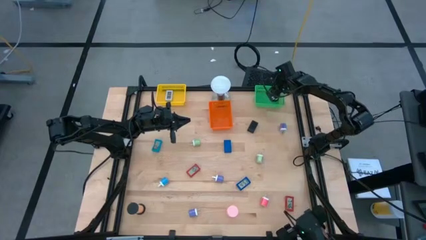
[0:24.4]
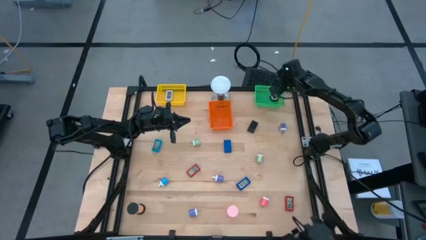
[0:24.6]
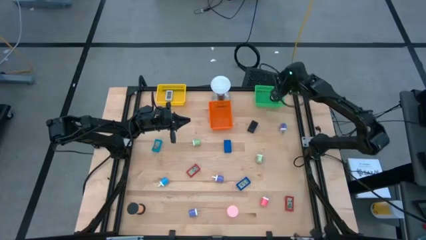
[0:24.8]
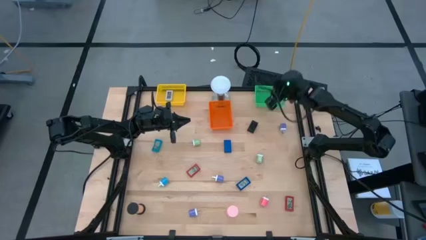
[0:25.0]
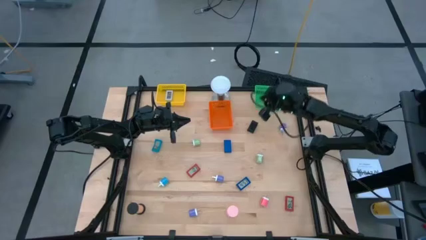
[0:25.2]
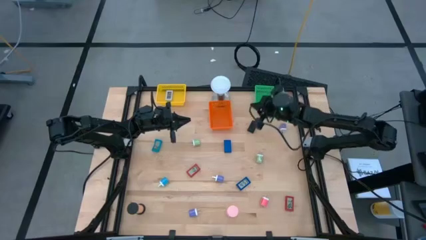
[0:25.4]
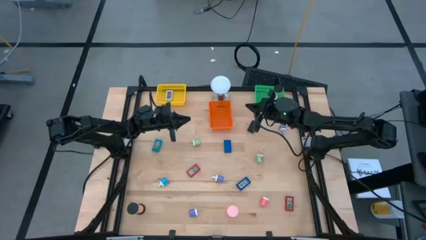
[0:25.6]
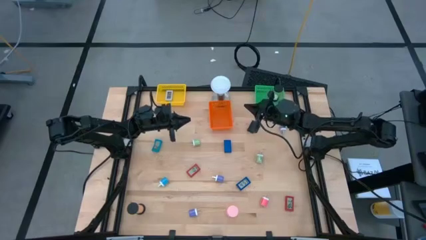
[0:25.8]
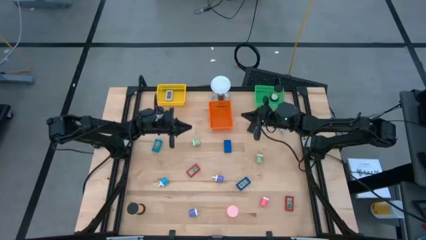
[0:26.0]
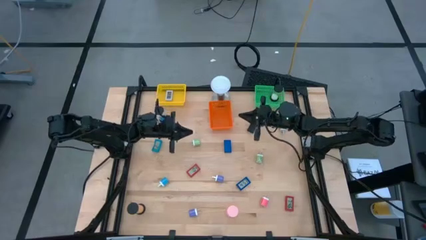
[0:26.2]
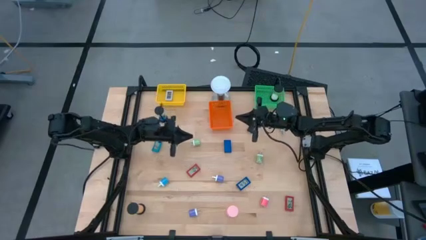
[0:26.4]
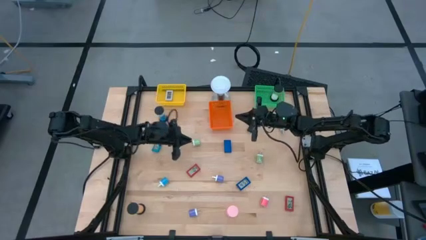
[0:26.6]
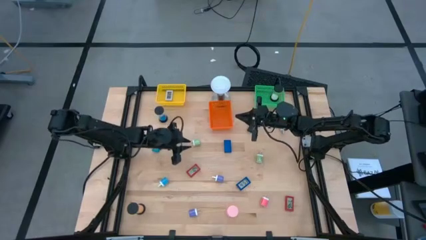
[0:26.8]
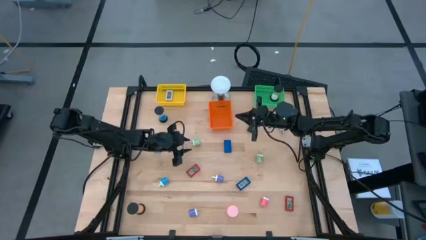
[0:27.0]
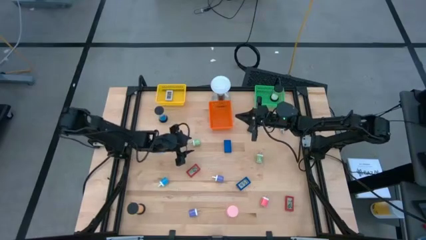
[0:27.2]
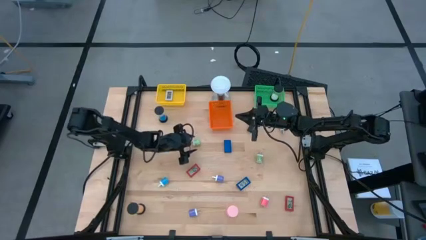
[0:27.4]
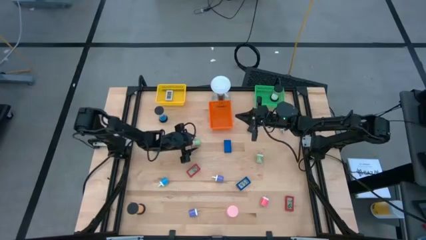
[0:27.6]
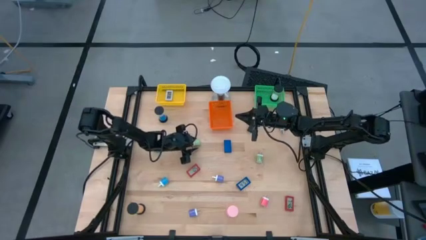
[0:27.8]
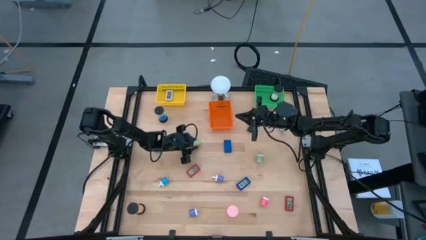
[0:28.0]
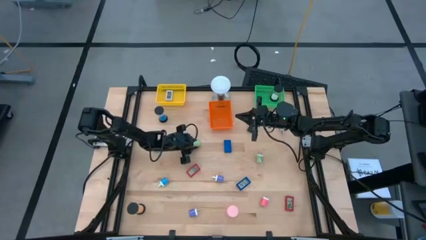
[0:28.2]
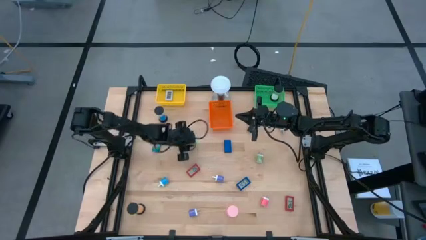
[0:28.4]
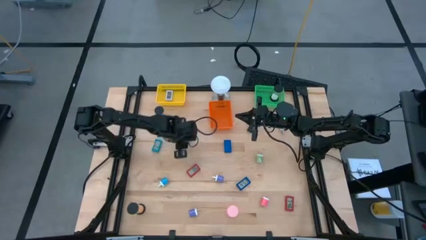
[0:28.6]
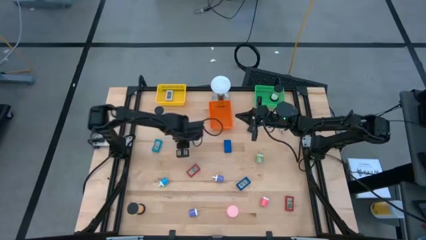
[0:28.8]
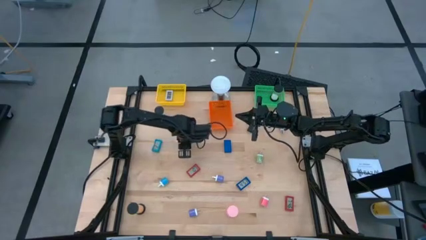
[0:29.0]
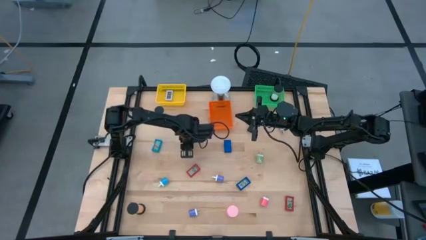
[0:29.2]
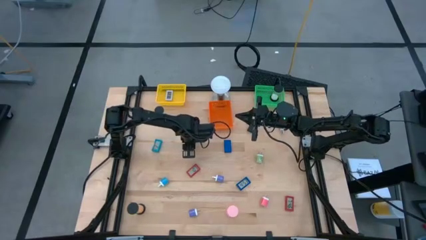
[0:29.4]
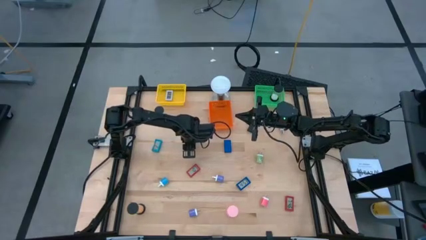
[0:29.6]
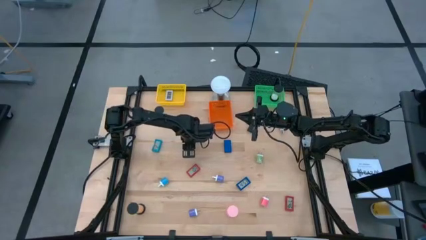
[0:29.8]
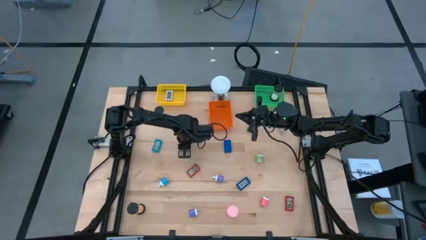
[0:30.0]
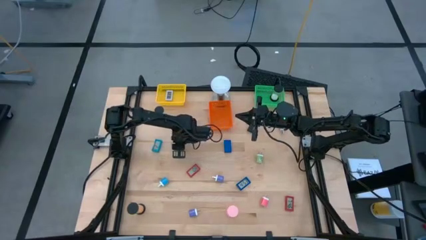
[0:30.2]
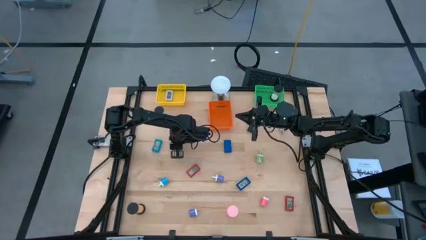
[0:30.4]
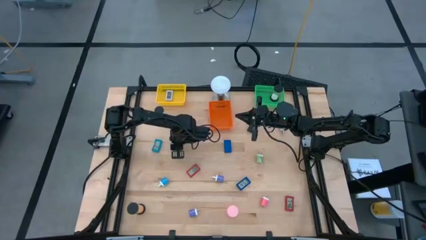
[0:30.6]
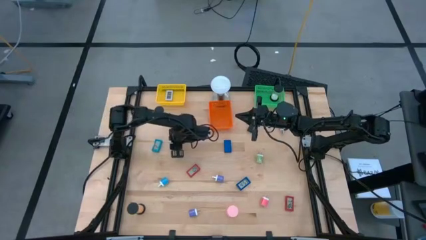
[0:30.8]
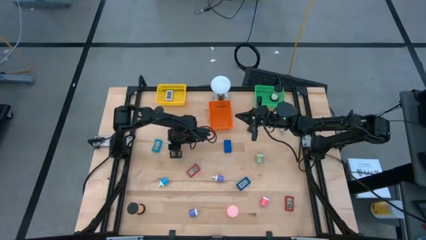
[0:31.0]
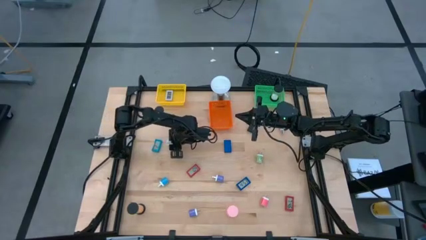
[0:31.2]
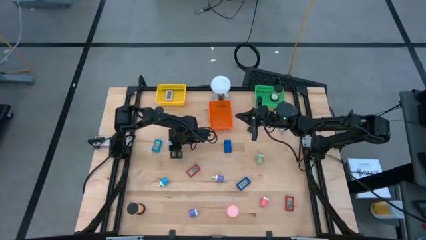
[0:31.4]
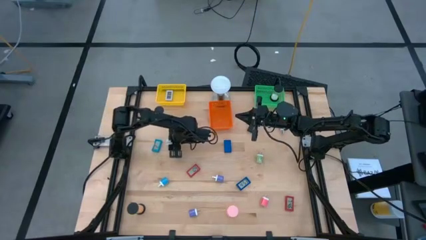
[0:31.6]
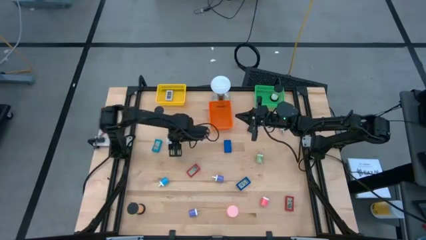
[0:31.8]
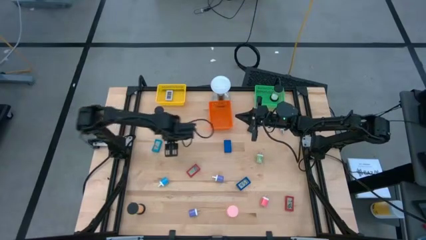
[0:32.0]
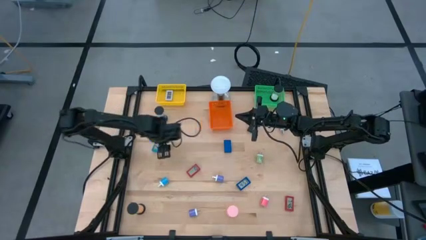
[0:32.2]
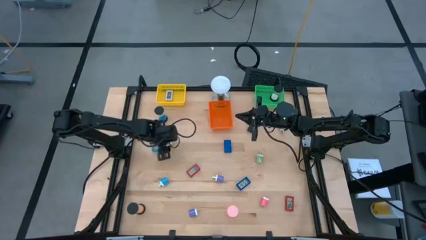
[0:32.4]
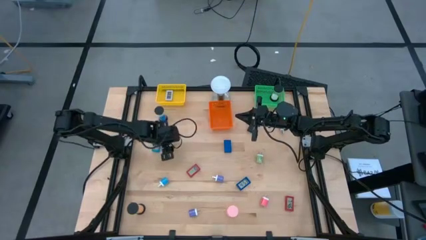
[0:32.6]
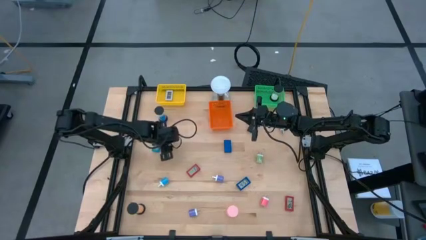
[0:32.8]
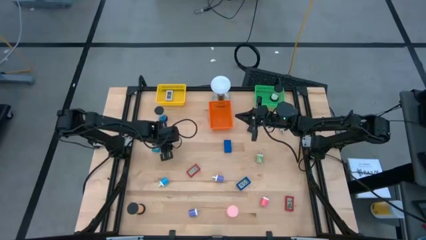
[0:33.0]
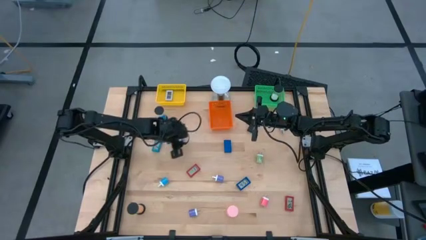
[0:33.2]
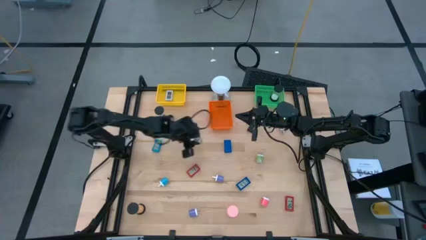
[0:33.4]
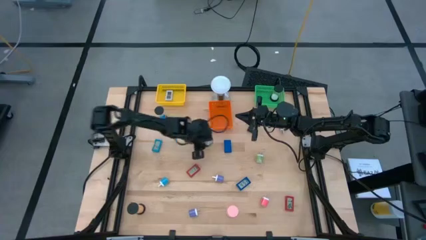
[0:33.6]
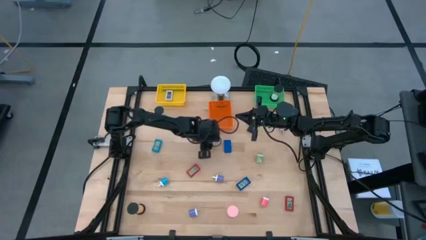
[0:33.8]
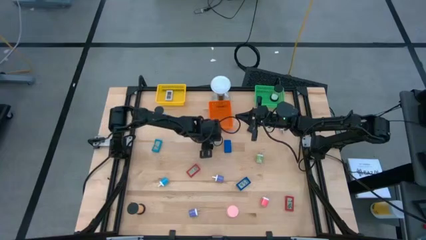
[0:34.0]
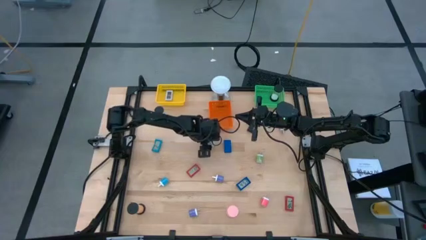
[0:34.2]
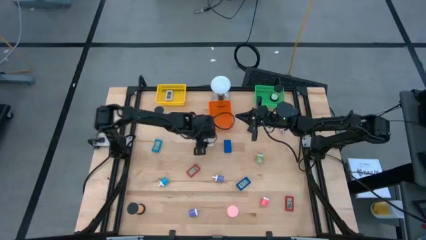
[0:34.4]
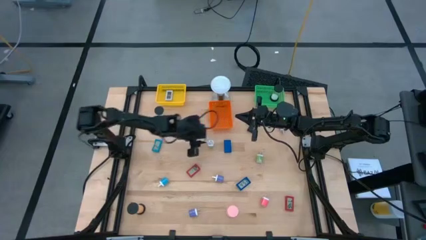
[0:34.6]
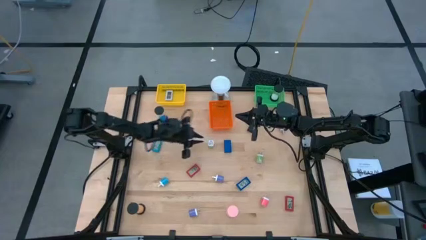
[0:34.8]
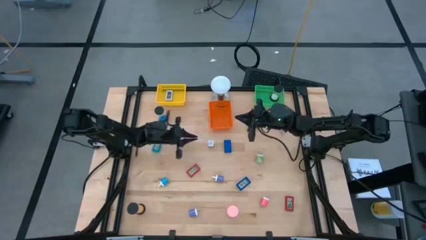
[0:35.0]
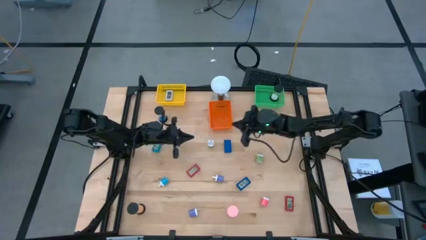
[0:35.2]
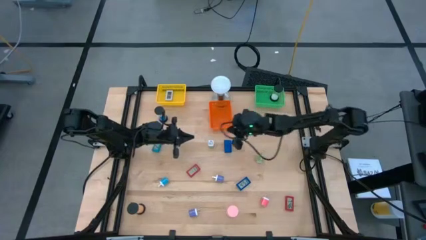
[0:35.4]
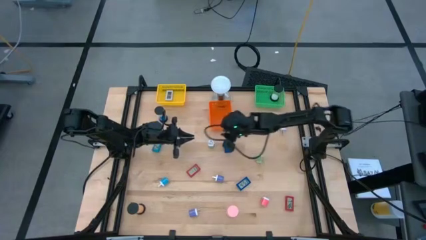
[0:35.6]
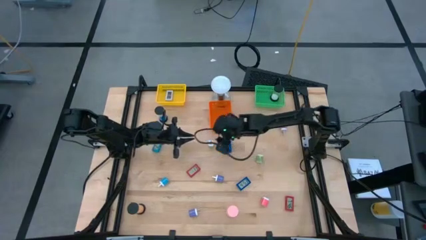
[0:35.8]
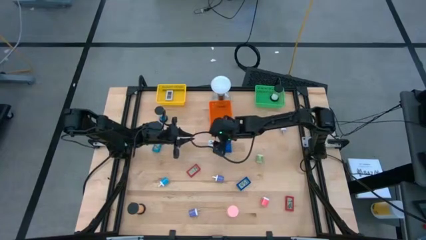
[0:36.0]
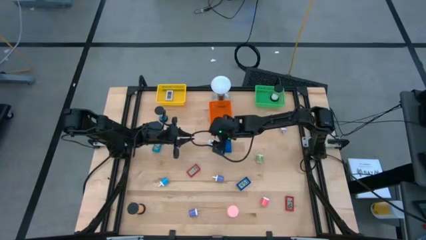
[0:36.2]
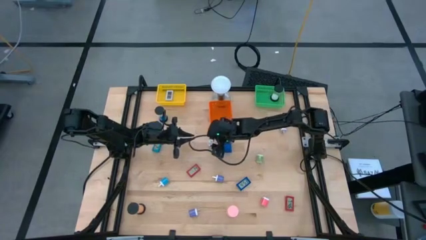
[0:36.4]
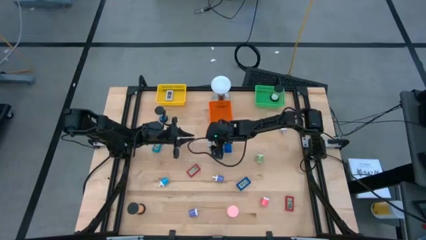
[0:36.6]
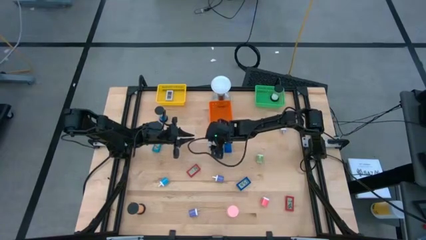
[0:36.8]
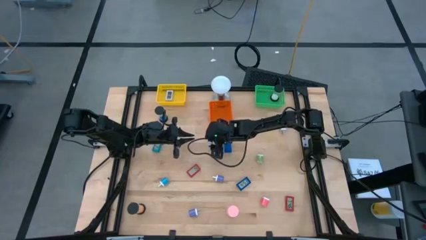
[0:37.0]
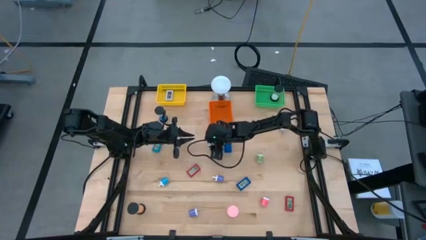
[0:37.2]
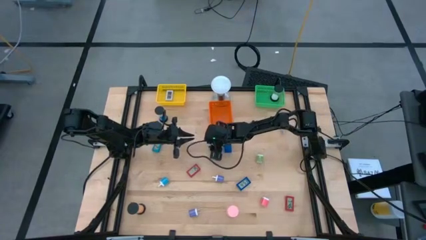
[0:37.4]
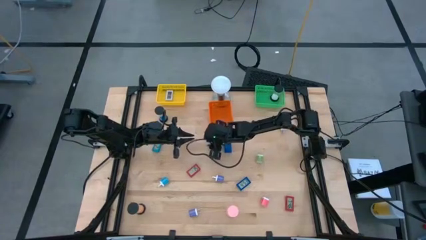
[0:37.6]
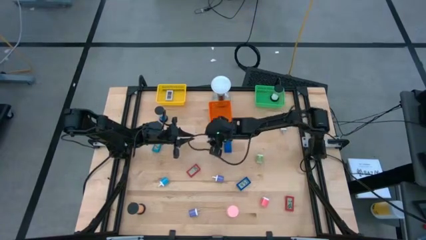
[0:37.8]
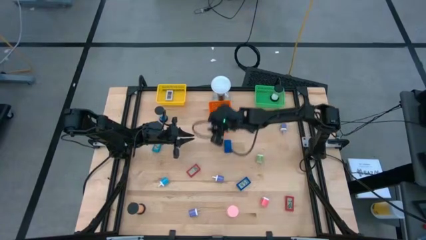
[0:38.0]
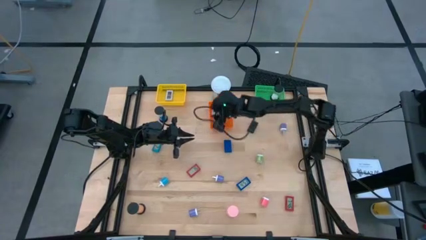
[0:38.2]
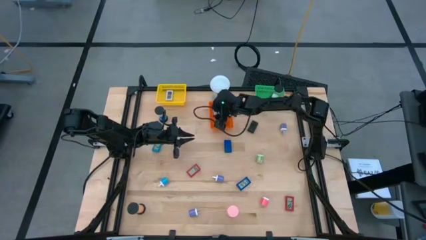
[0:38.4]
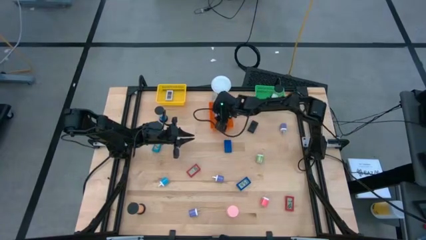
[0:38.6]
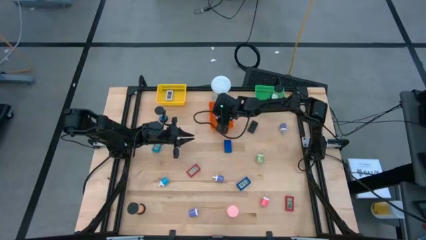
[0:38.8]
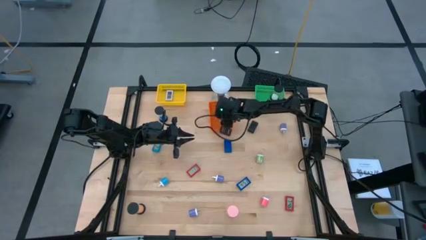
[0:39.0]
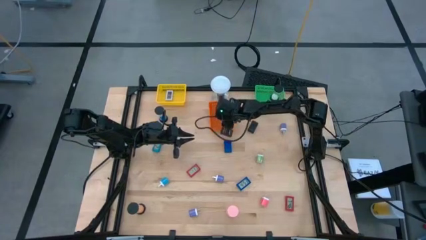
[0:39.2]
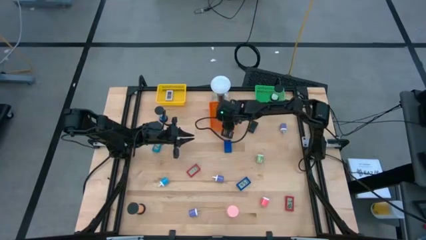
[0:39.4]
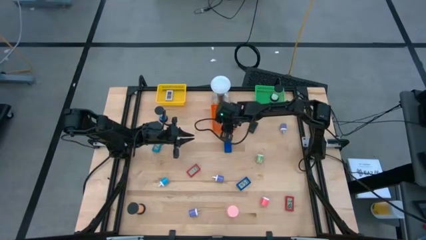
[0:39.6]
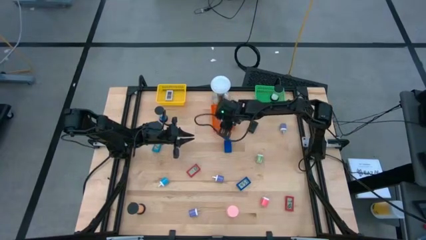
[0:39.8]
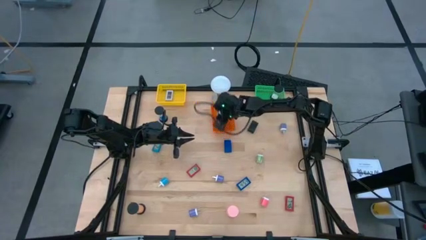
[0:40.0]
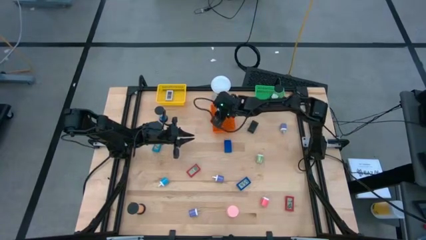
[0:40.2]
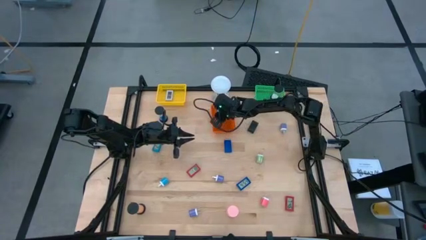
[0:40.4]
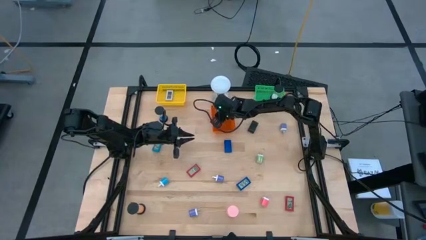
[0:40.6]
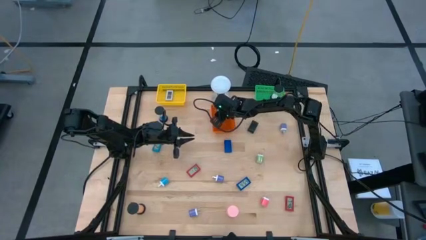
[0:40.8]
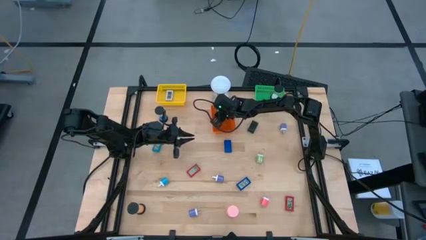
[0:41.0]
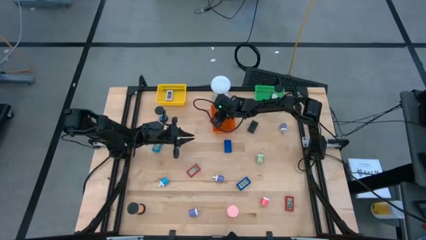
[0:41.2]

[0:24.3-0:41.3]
Task: Pick & Place Office items
Put the left green charger adapter into the orange bin
